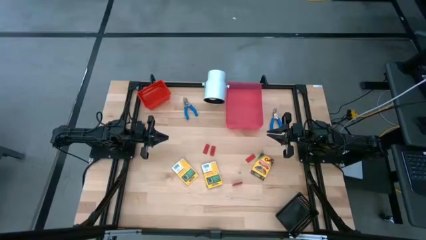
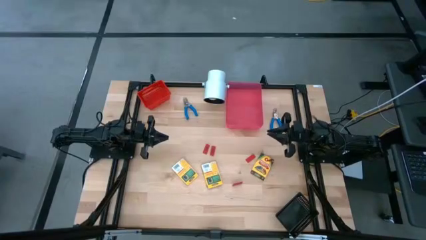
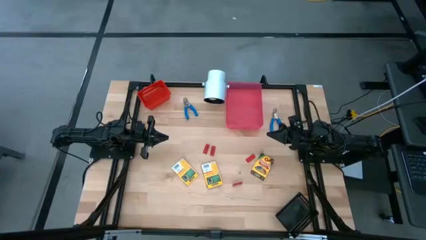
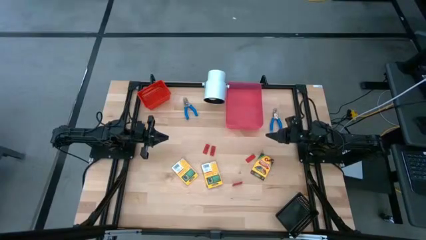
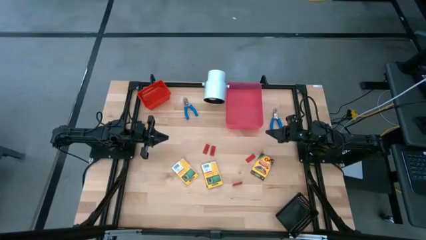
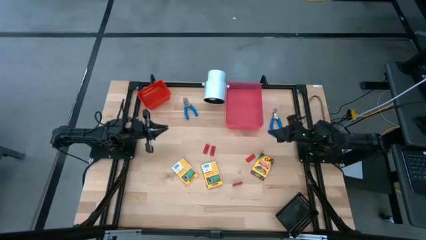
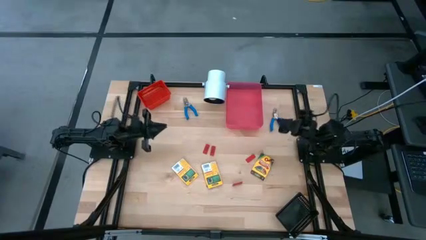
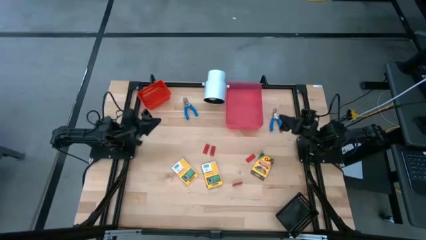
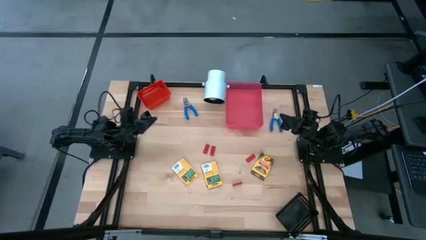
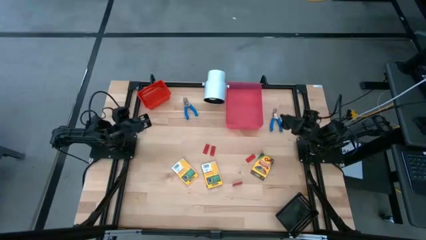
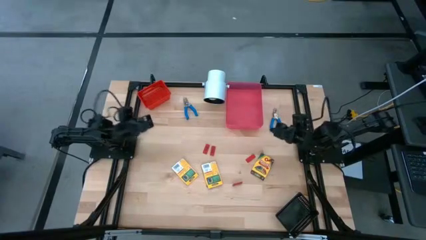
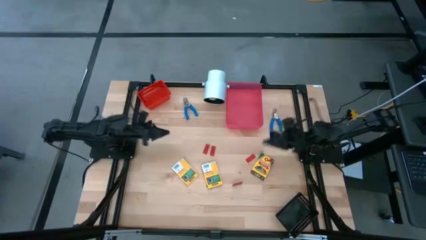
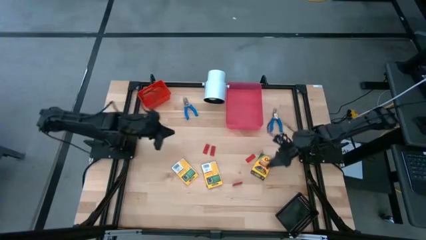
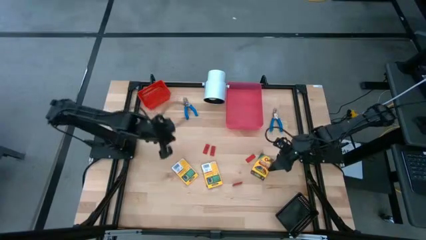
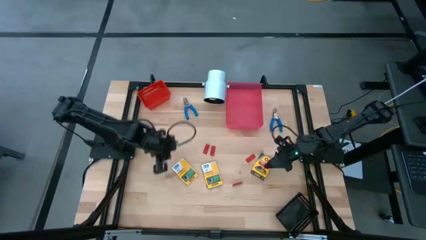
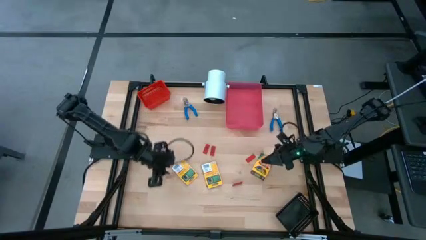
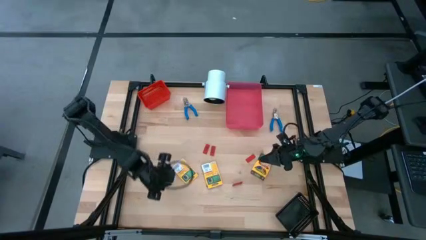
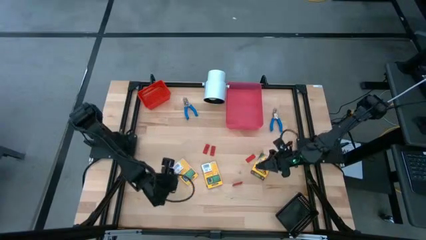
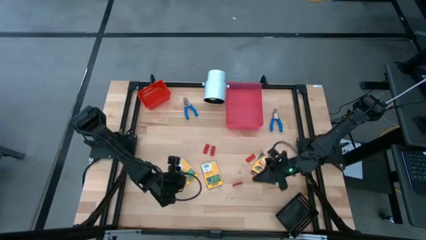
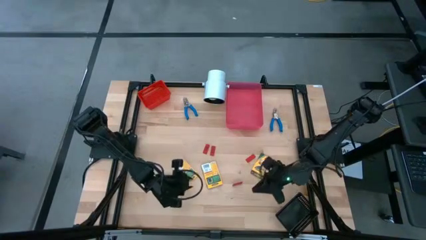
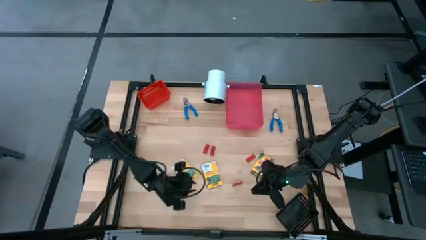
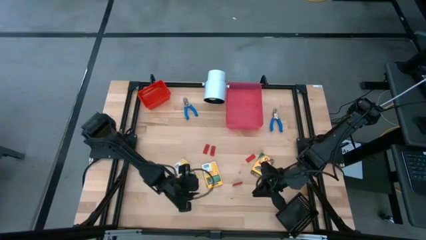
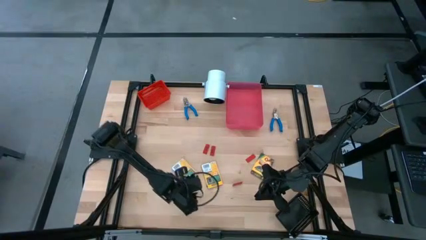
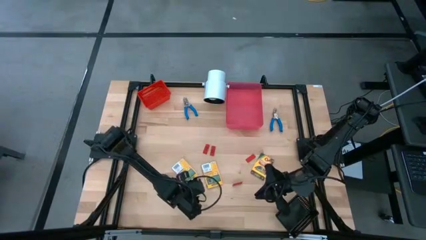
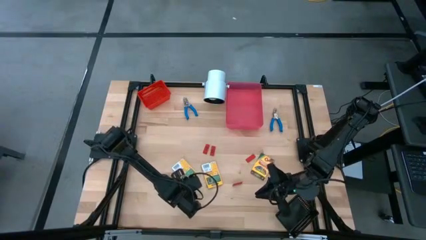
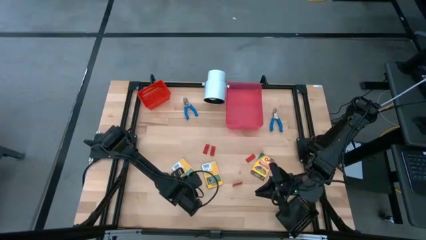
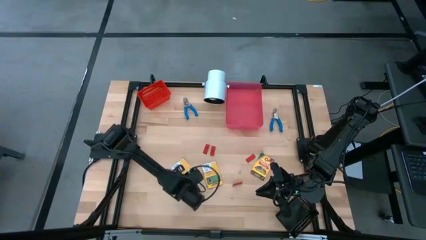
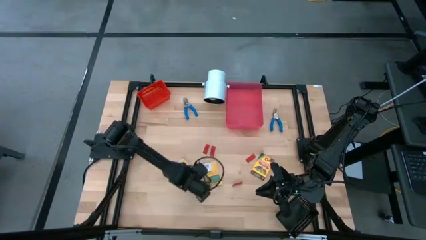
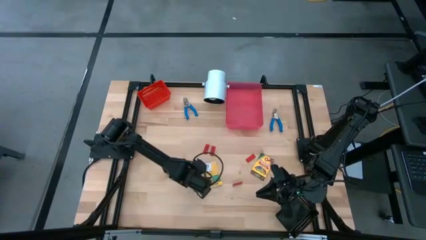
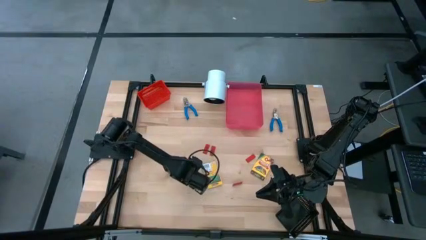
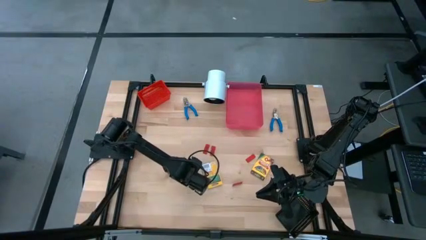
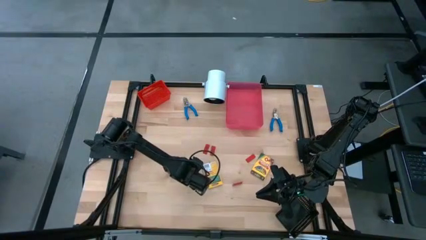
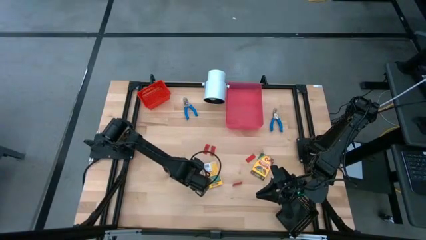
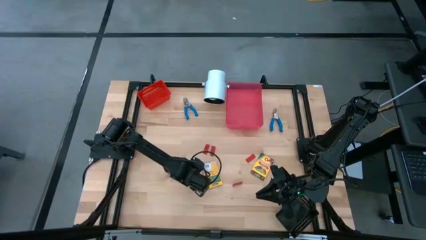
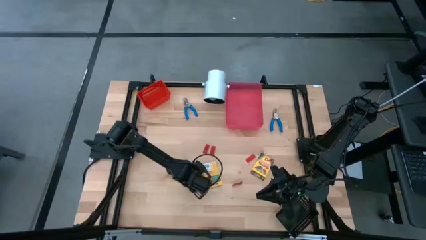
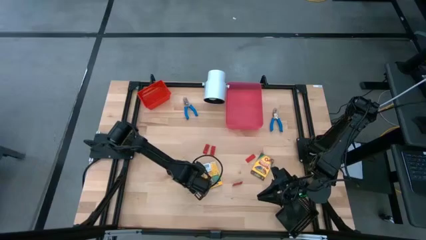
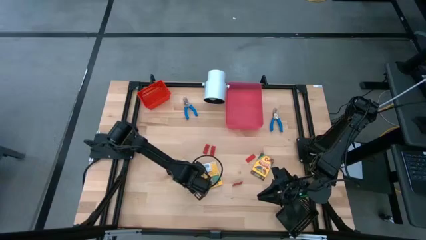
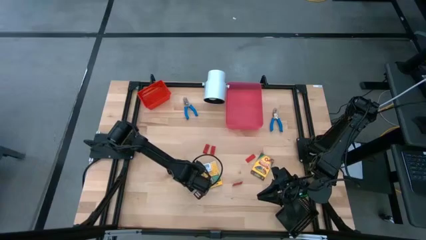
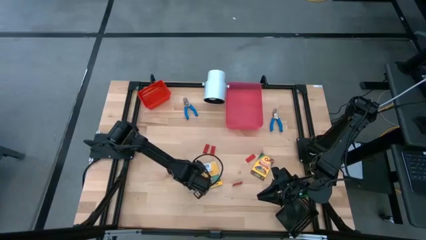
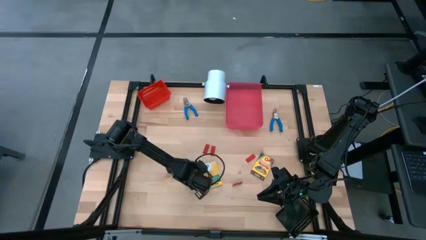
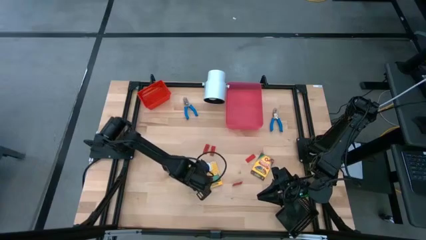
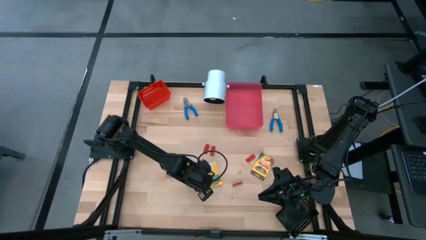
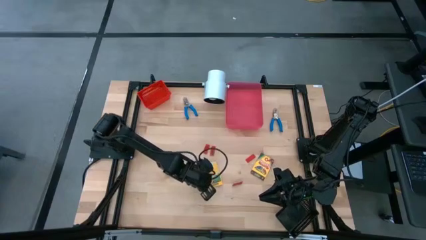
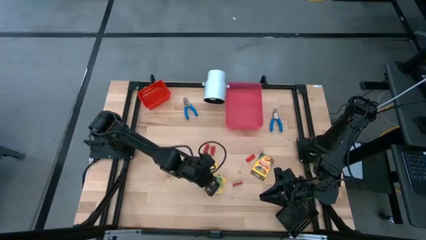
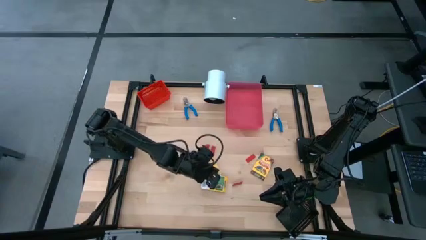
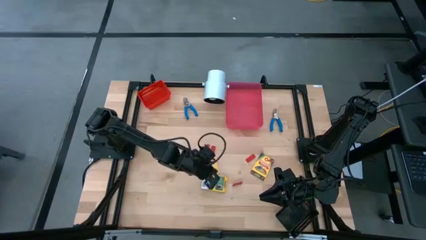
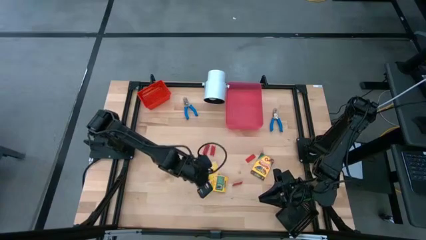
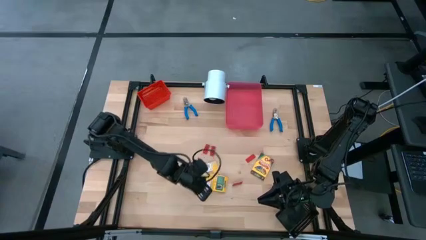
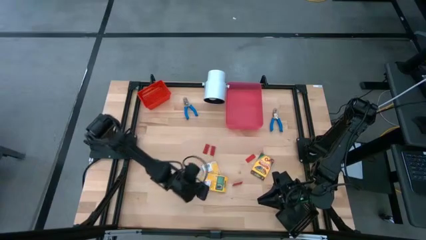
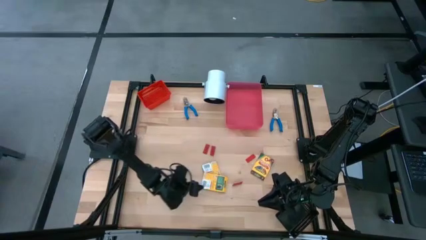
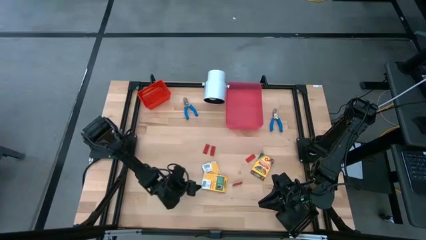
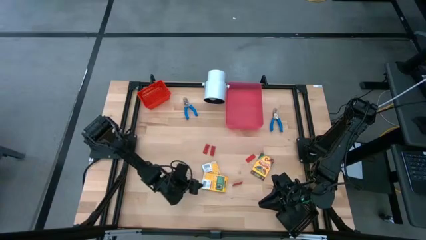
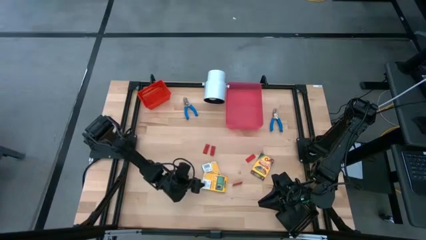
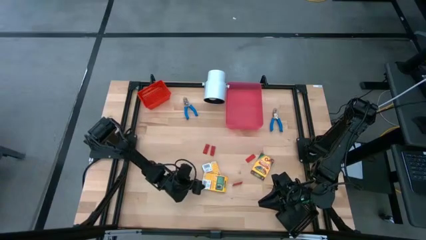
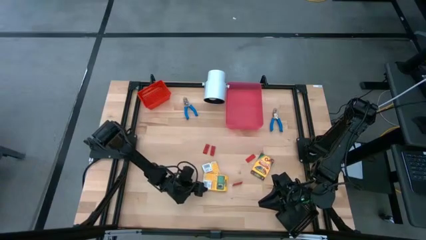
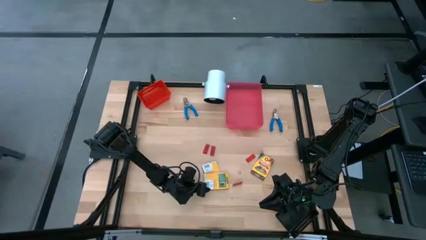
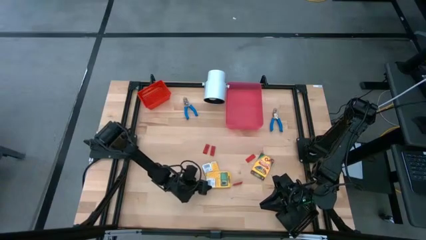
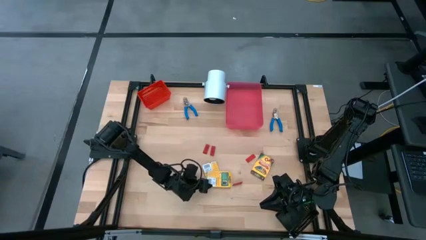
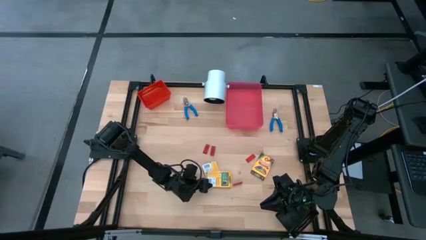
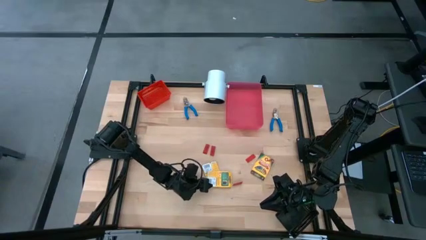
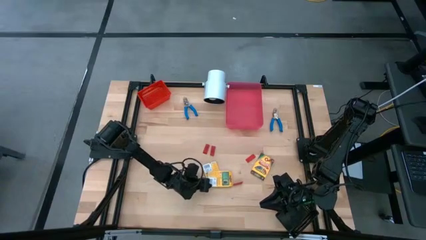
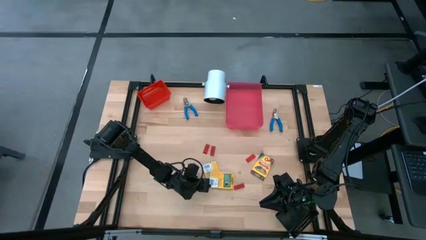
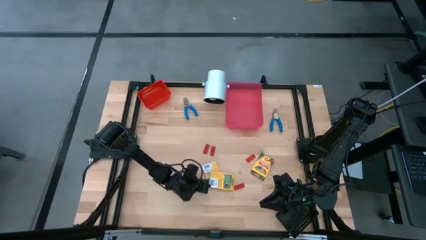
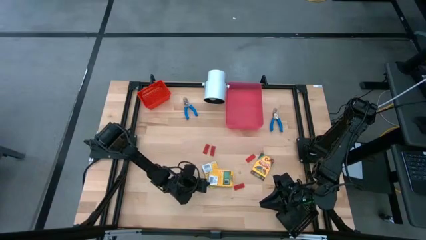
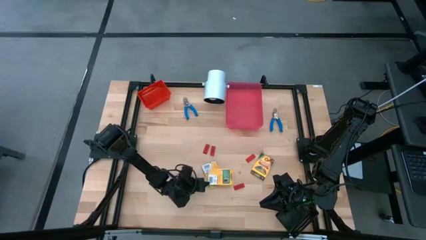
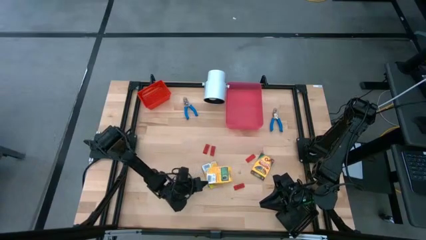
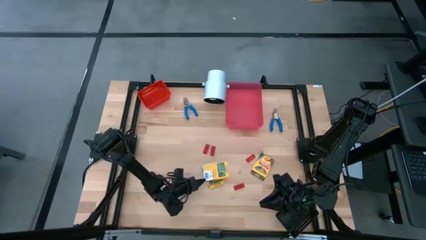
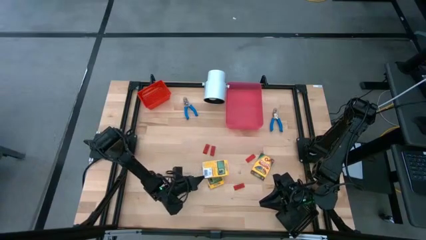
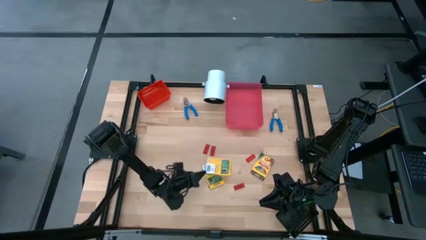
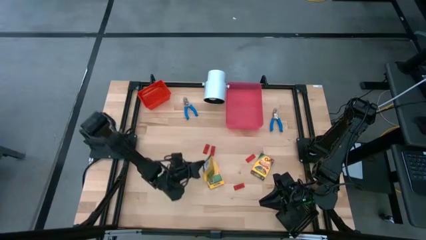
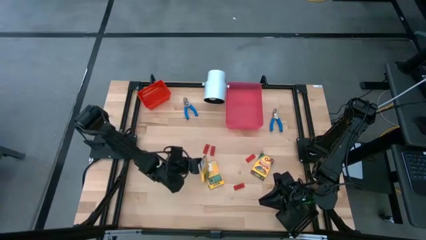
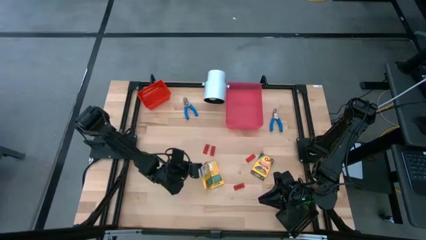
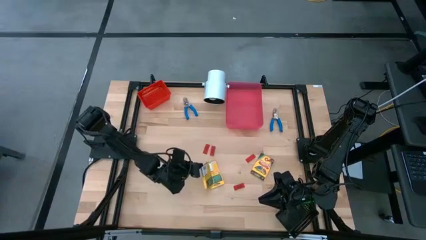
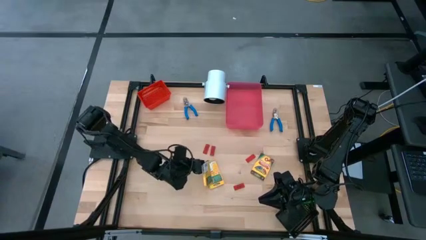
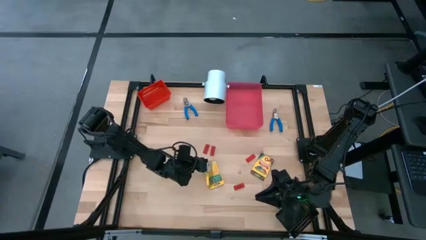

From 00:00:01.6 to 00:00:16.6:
Task: Pick & Place School Supplies
Put the yellow crayon box into the red bin
